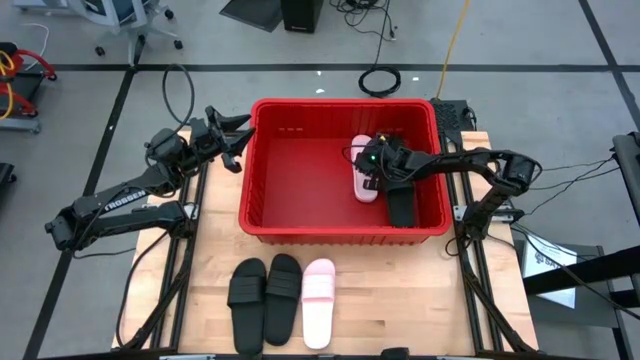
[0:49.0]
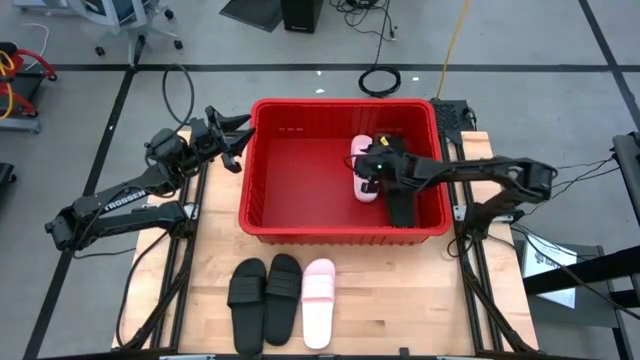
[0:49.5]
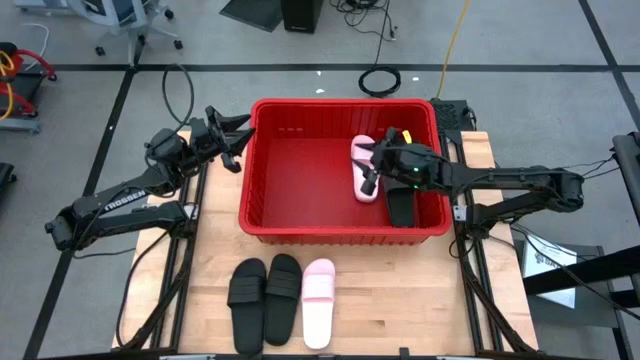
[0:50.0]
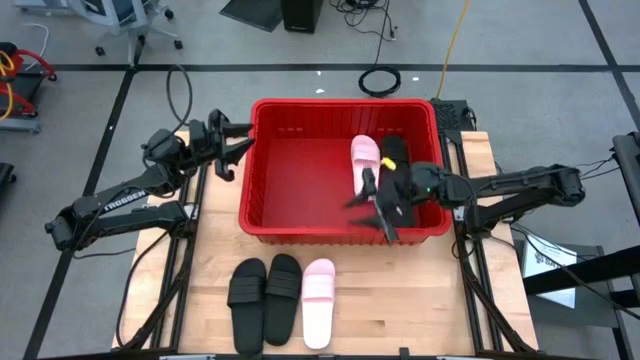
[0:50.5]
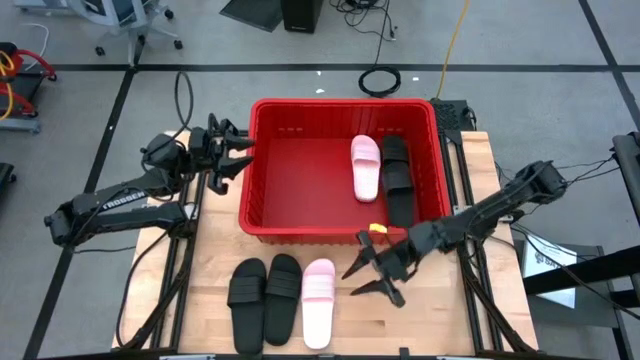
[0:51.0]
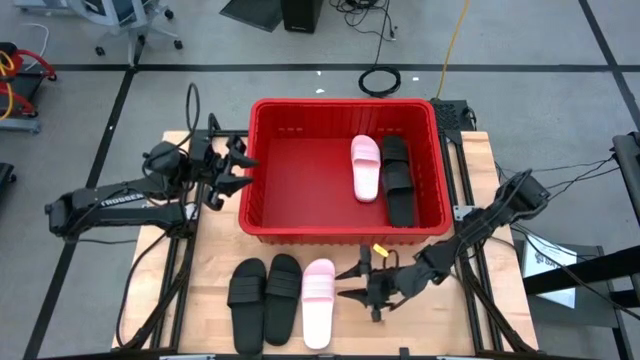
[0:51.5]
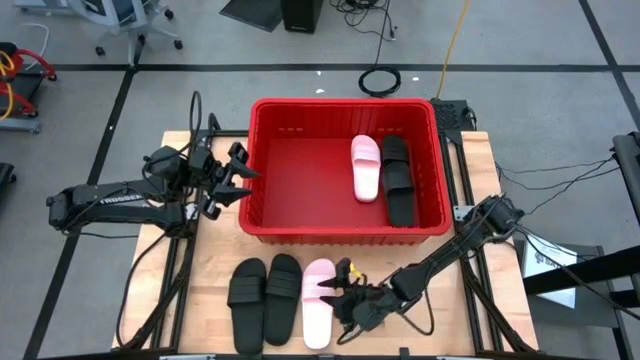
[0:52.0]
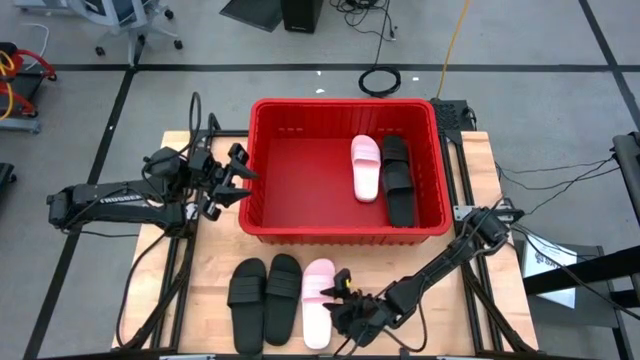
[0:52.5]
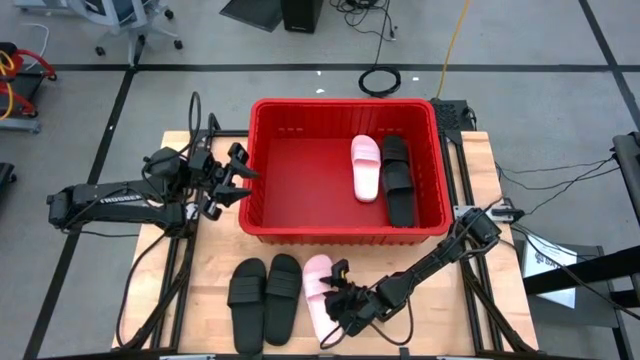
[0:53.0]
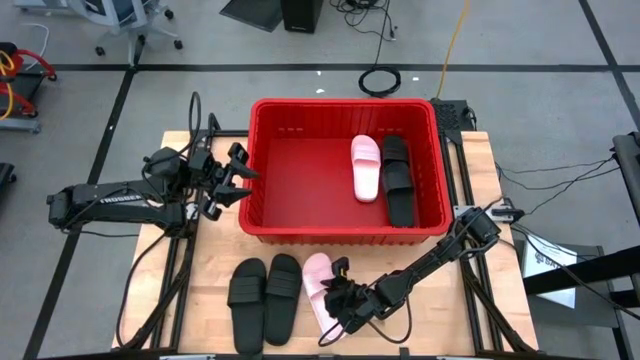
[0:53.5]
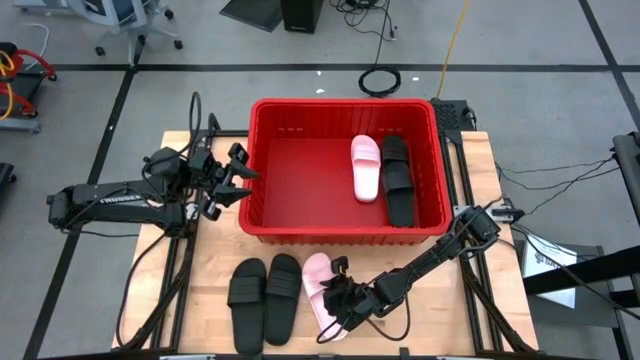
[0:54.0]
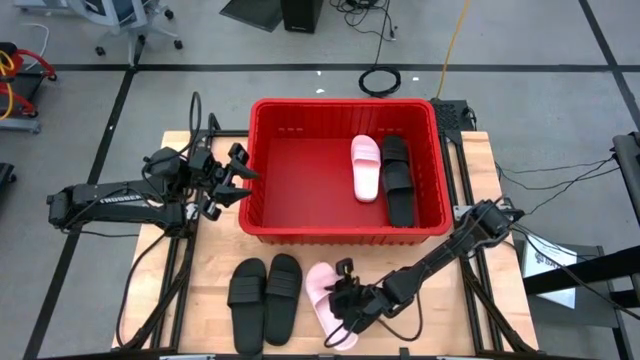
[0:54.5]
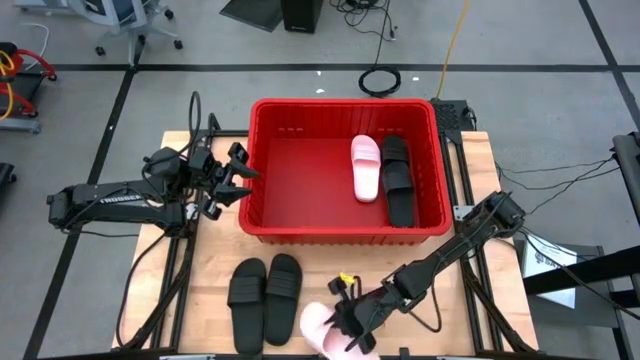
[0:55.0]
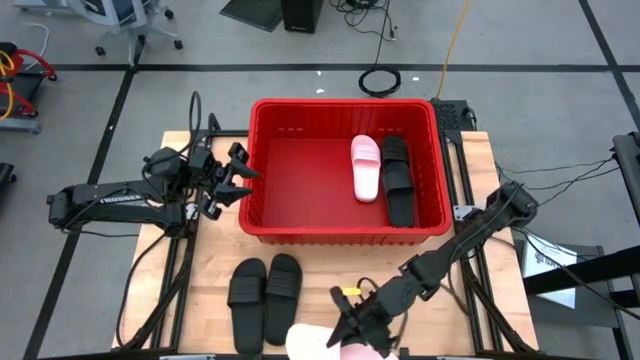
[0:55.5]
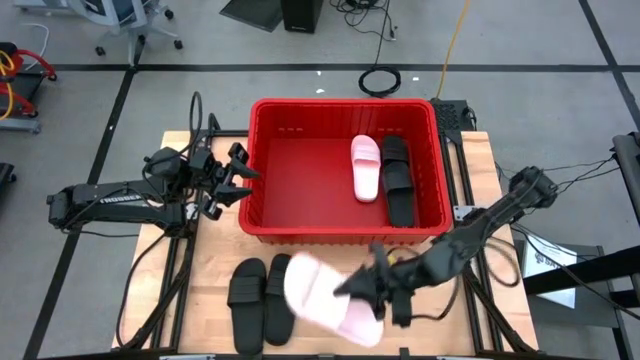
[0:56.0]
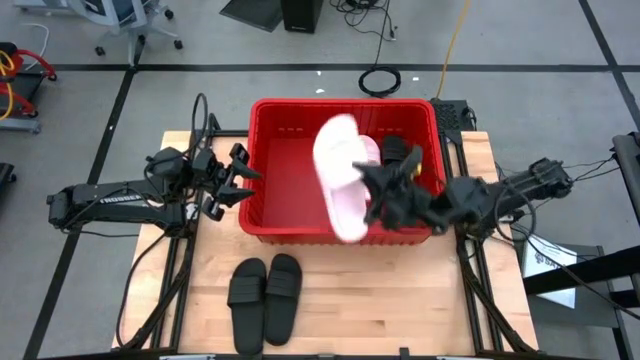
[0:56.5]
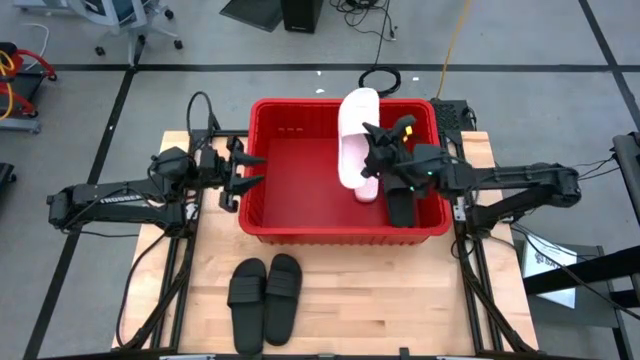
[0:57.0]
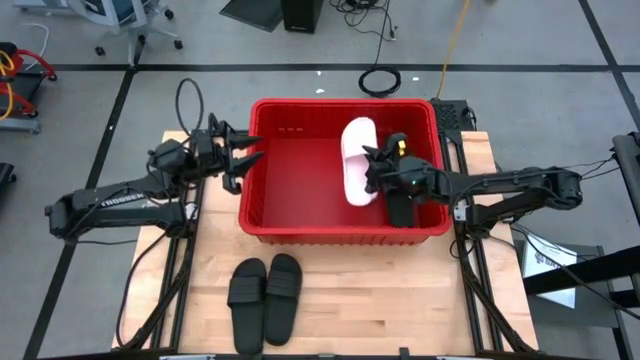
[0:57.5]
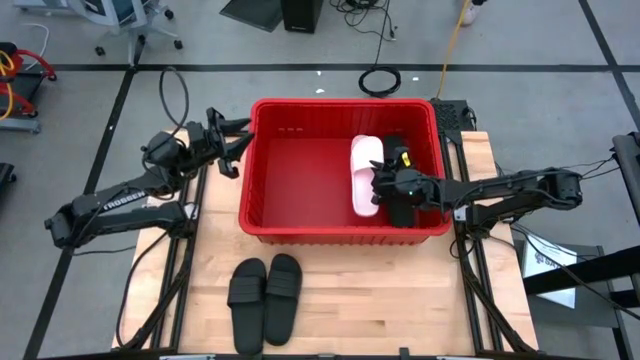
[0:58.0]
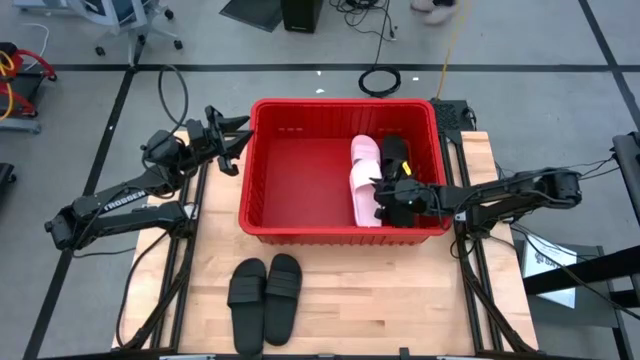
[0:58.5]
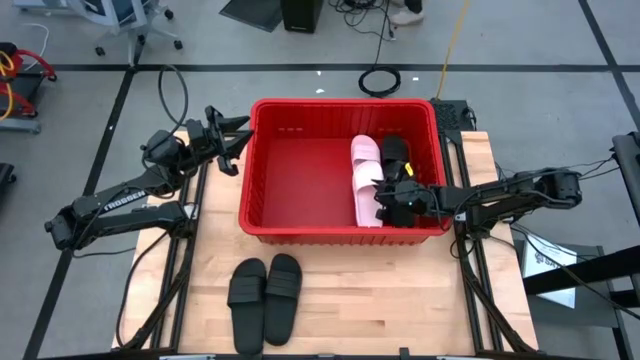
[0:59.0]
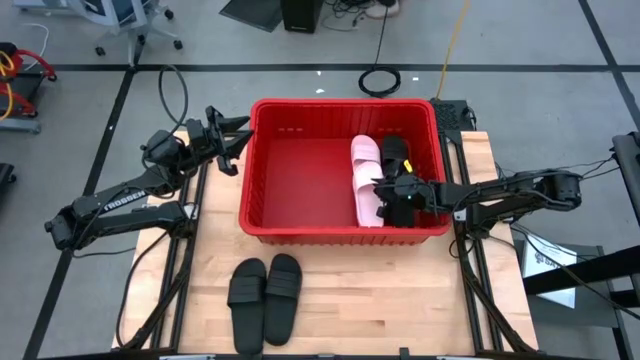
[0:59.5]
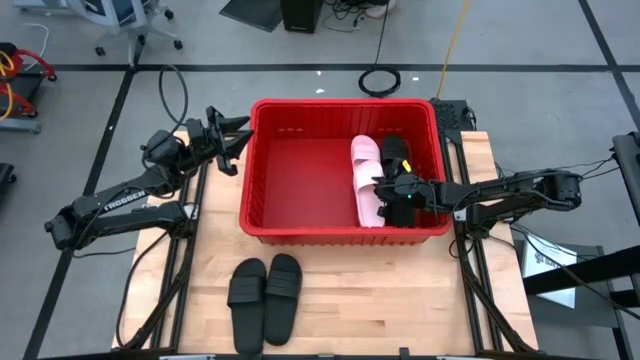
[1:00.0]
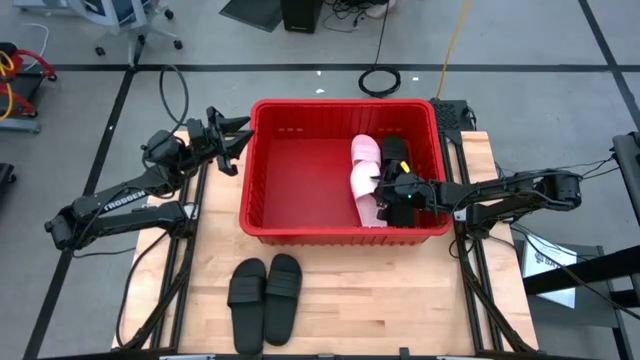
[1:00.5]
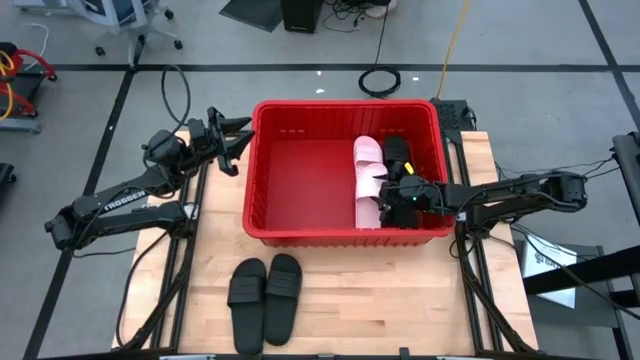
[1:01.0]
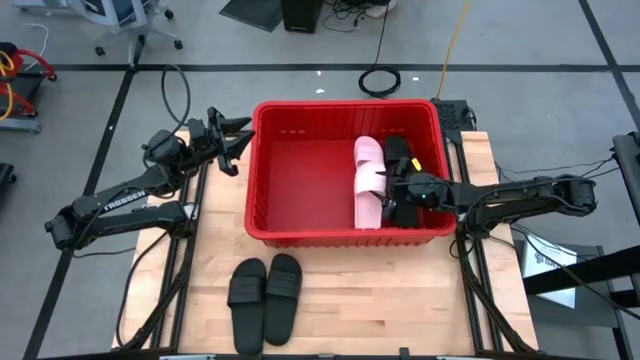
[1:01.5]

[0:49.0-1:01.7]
Task: Pick and place slides into bin
Put the pink slipper into the red container

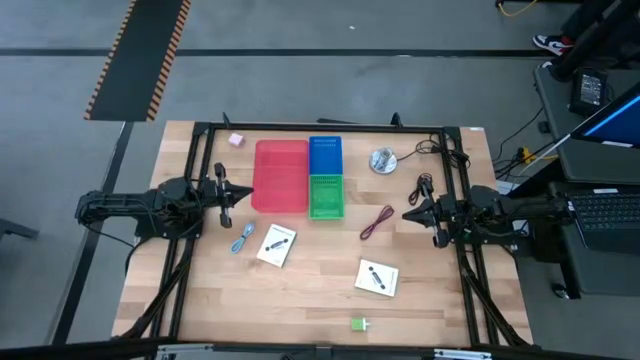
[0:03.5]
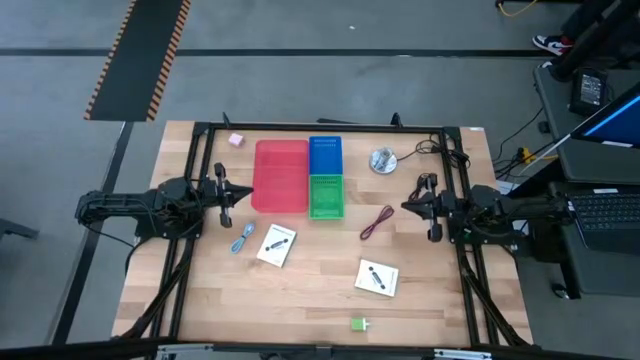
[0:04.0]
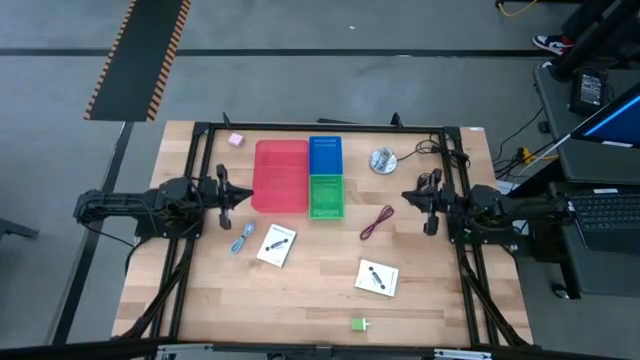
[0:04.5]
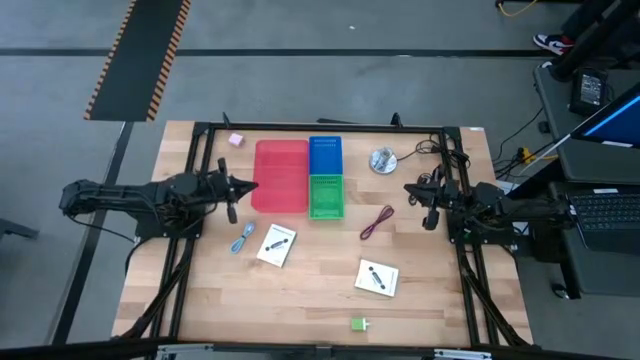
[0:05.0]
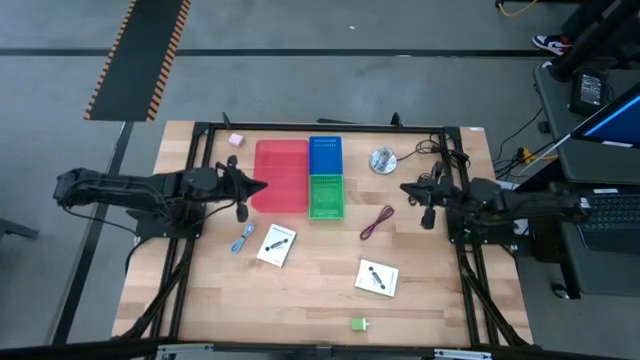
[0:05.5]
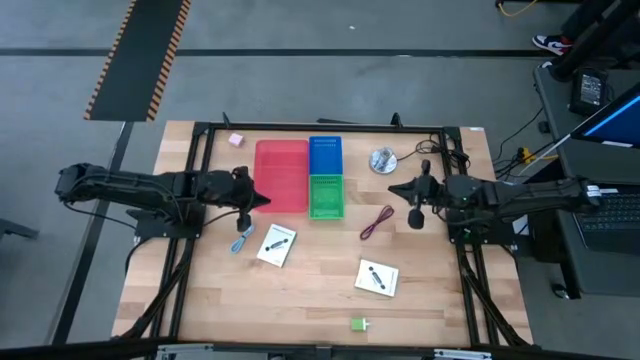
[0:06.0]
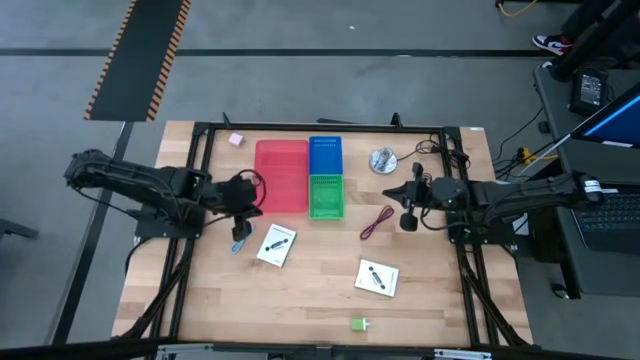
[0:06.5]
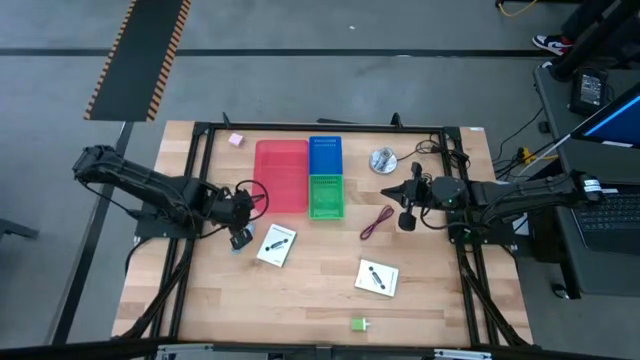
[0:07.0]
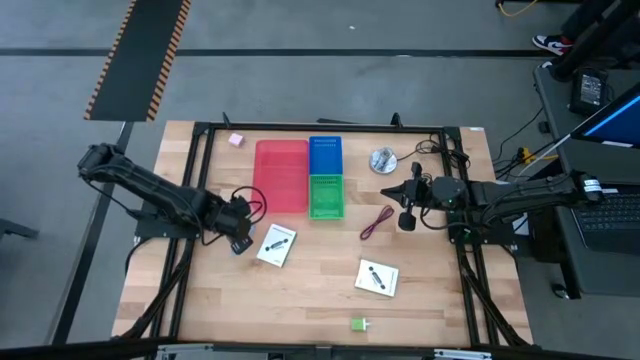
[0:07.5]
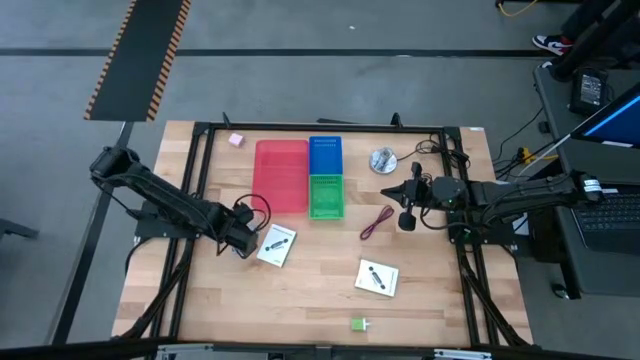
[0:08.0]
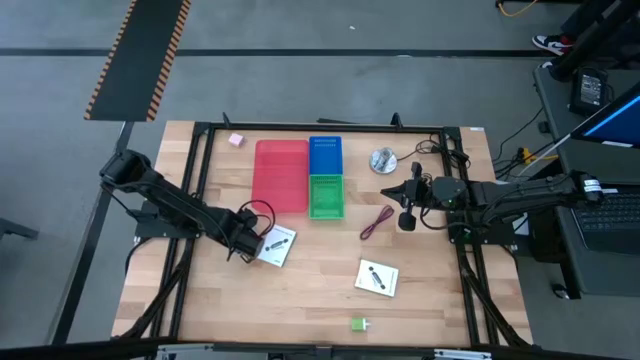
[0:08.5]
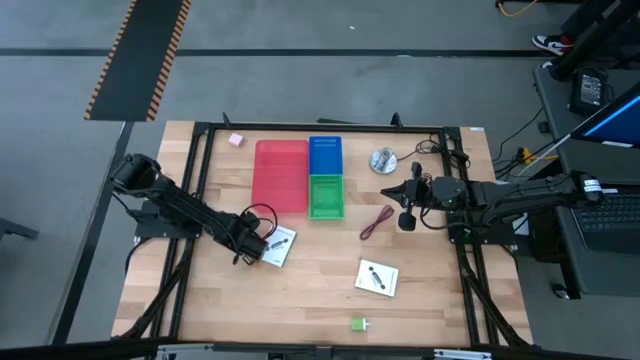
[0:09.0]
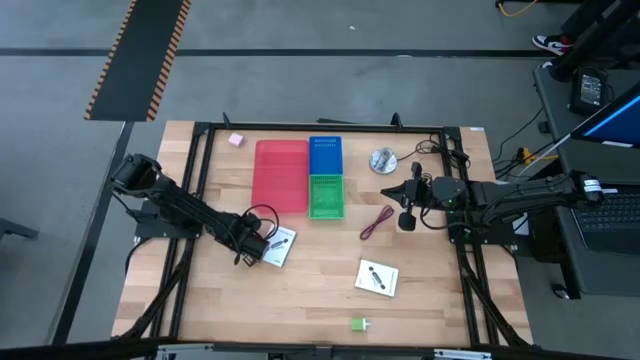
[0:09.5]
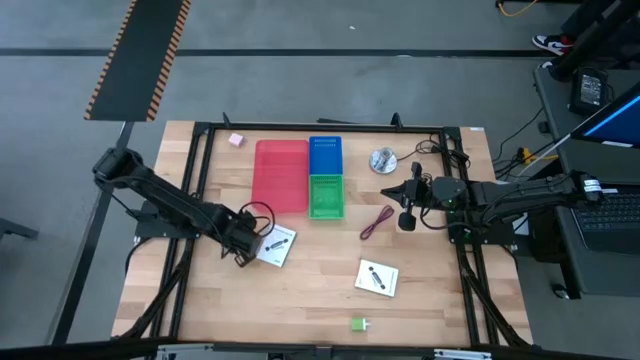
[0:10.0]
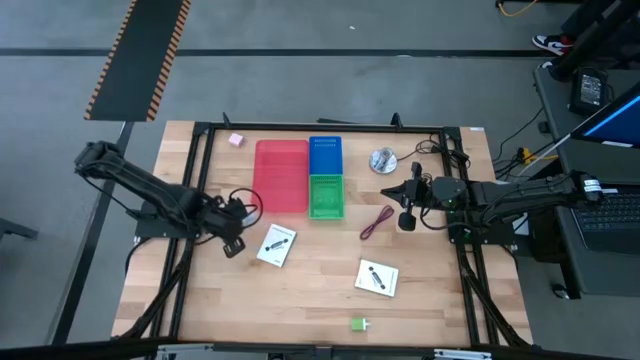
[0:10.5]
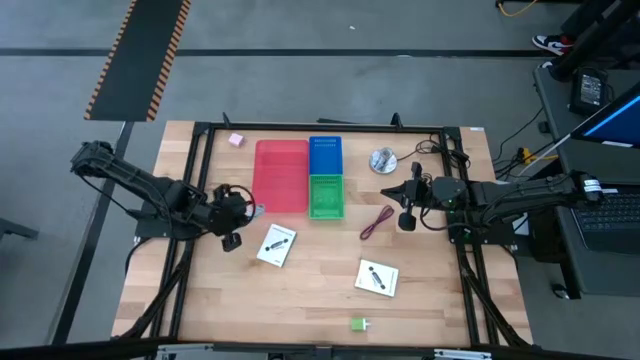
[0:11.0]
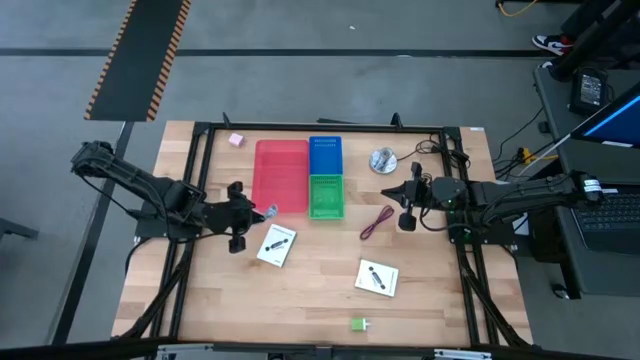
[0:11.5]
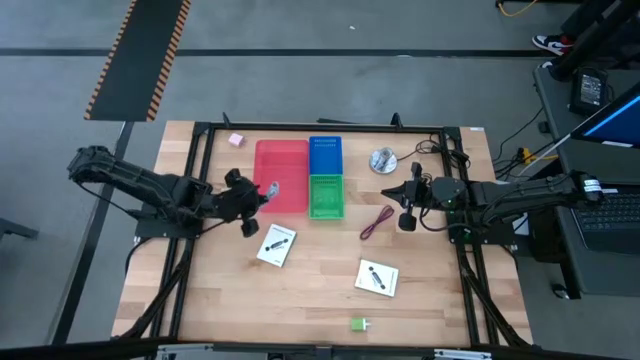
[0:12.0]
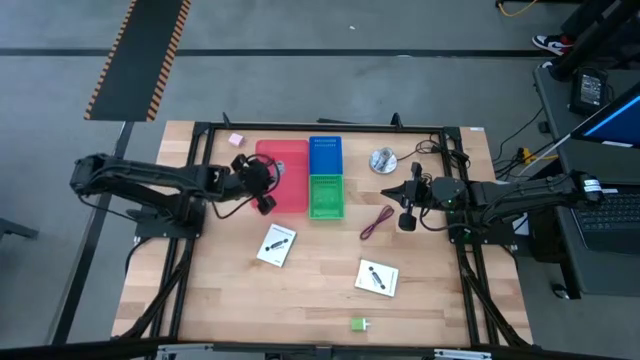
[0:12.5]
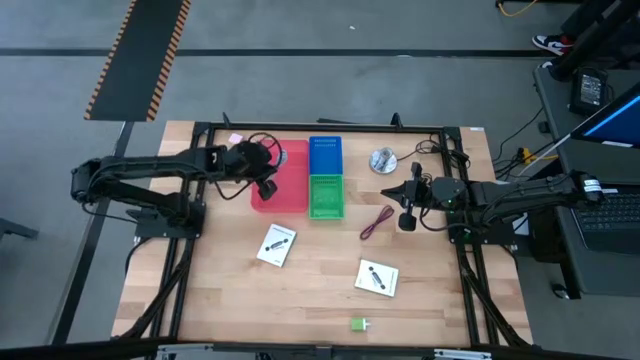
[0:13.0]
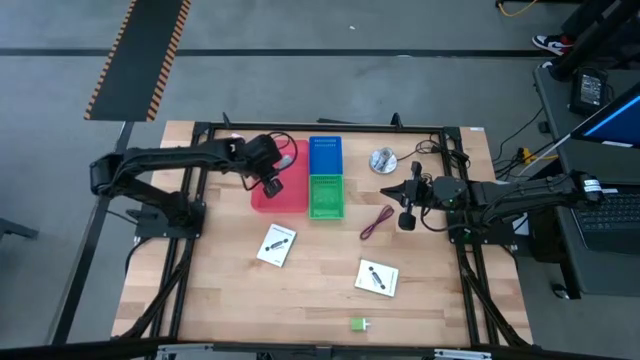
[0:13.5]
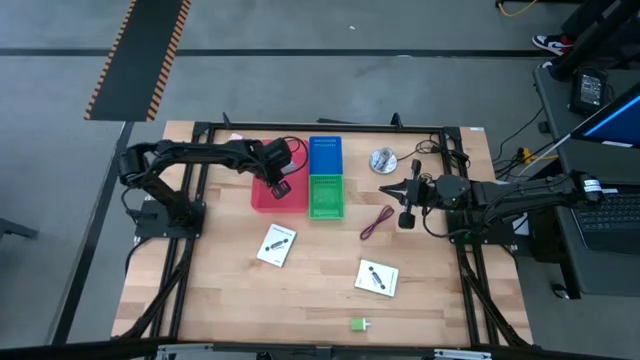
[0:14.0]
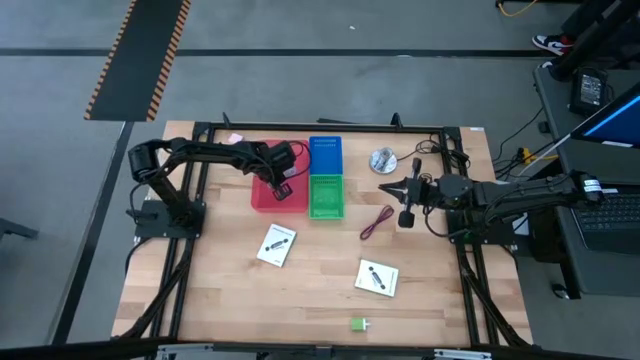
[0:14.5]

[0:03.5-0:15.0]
Task: Pick and place items into bin
Put the light blue charger cable into the red bin
